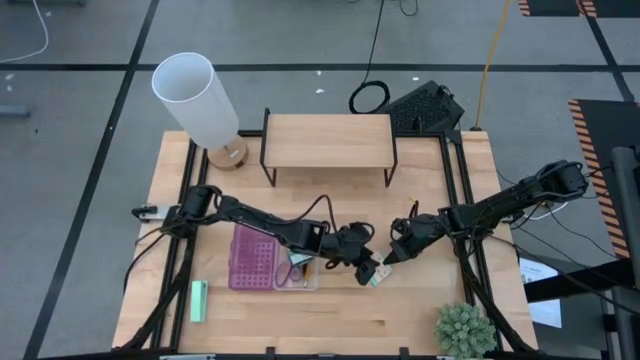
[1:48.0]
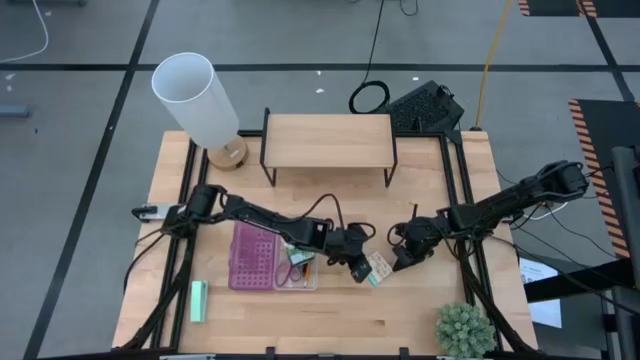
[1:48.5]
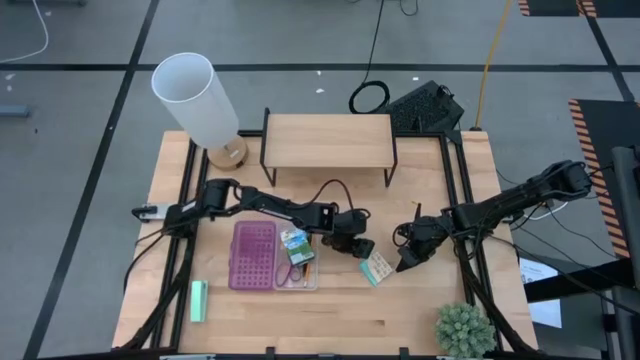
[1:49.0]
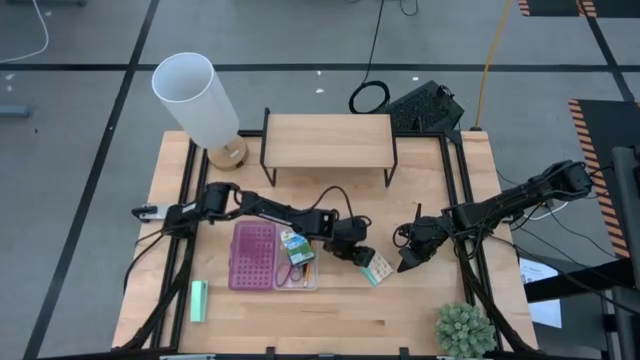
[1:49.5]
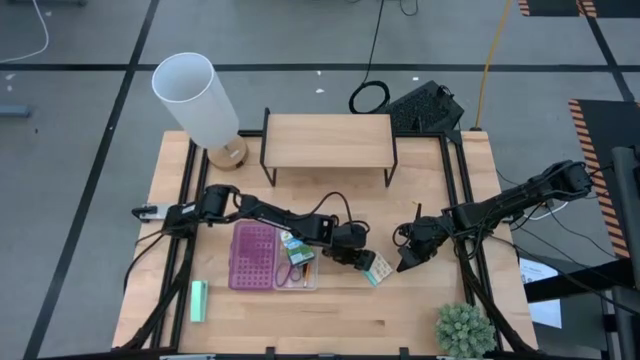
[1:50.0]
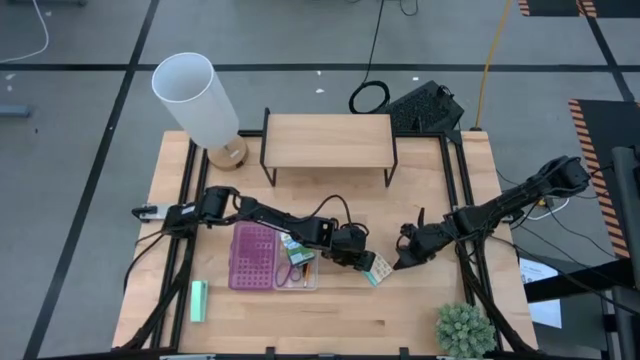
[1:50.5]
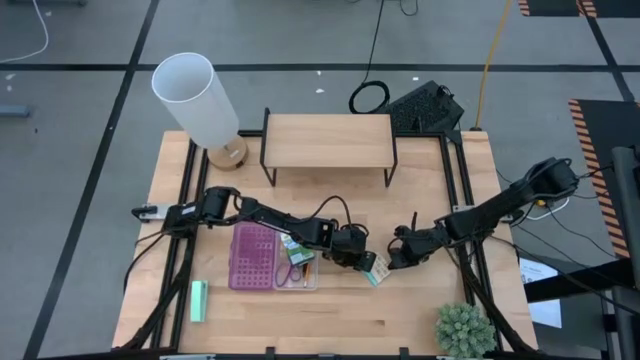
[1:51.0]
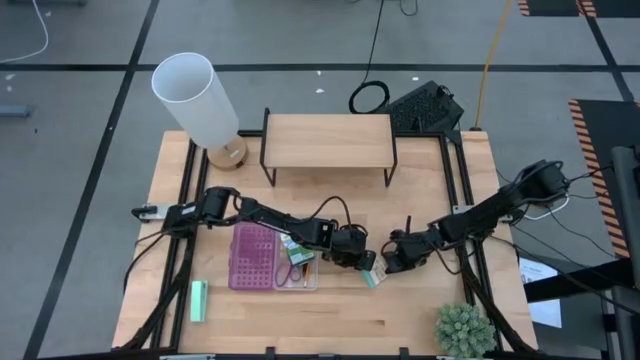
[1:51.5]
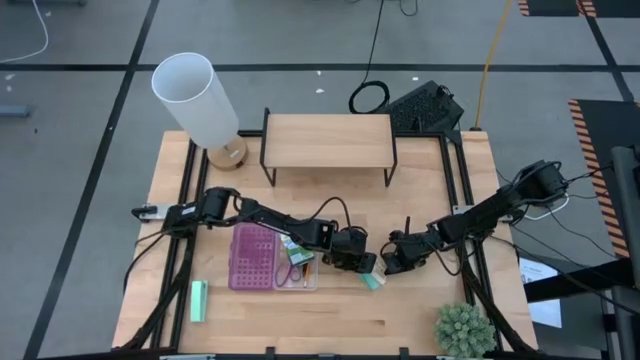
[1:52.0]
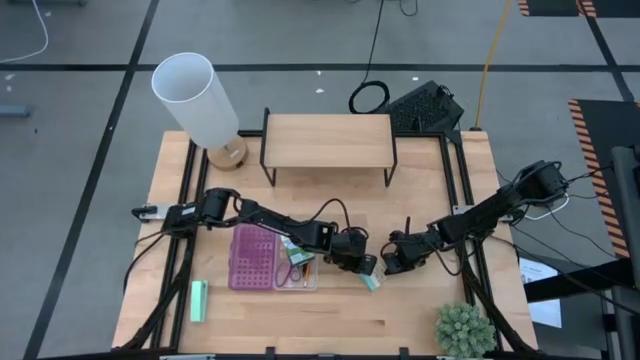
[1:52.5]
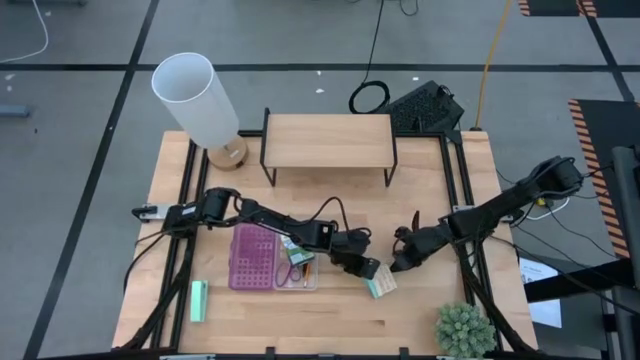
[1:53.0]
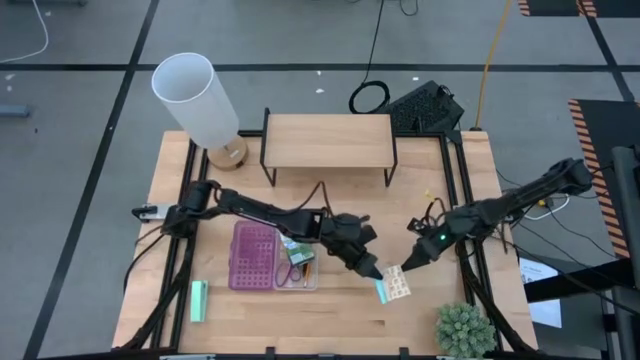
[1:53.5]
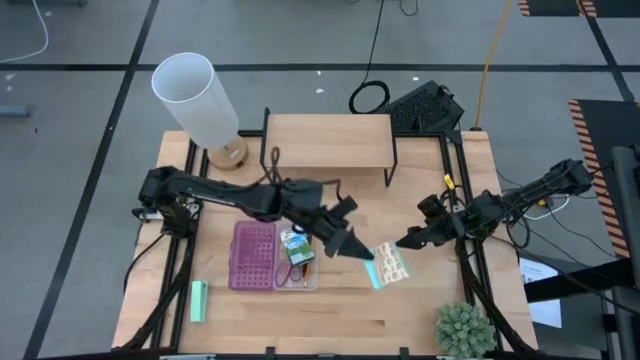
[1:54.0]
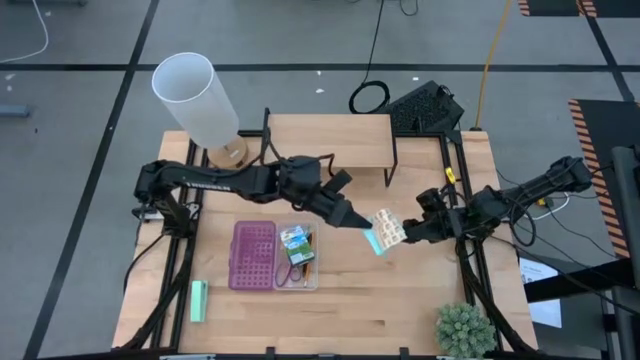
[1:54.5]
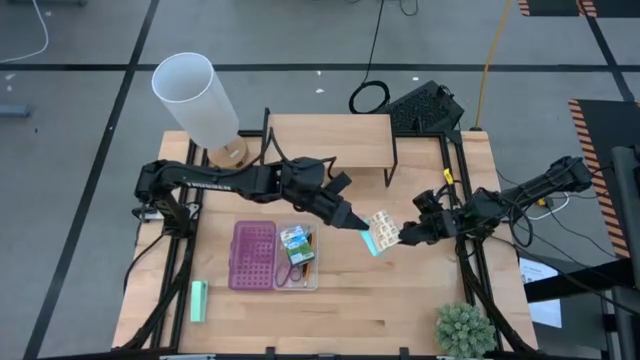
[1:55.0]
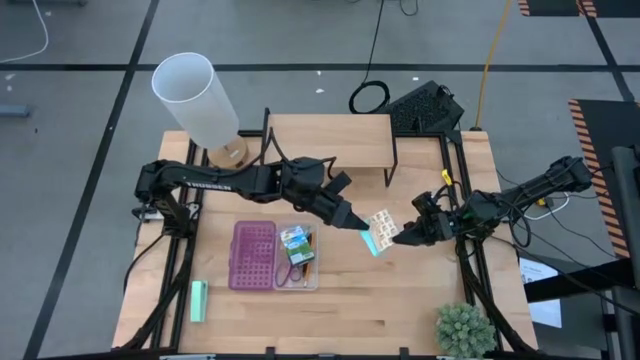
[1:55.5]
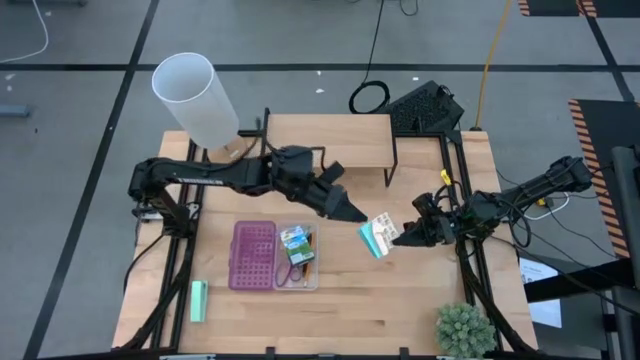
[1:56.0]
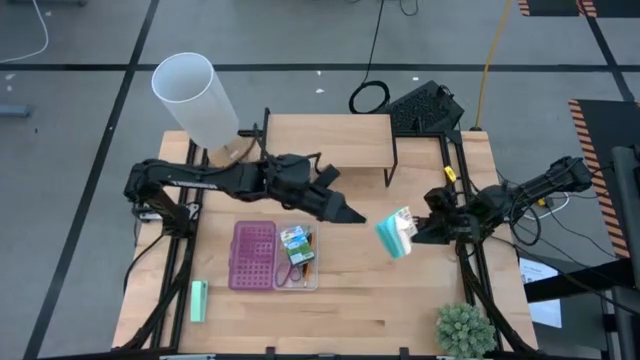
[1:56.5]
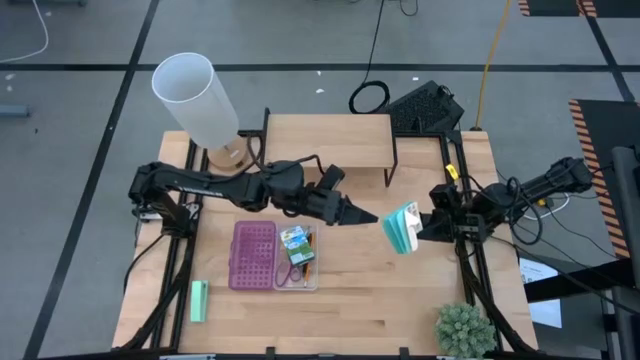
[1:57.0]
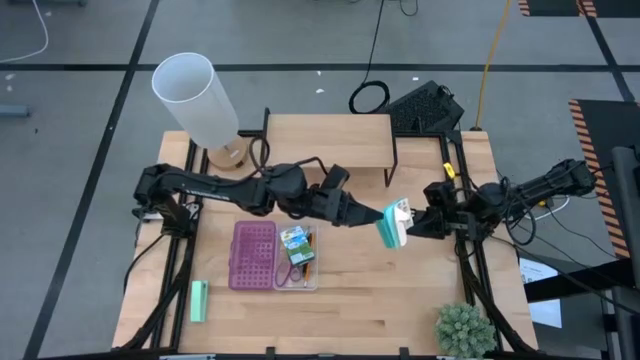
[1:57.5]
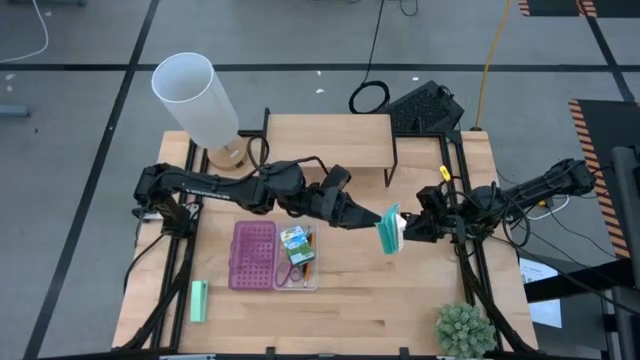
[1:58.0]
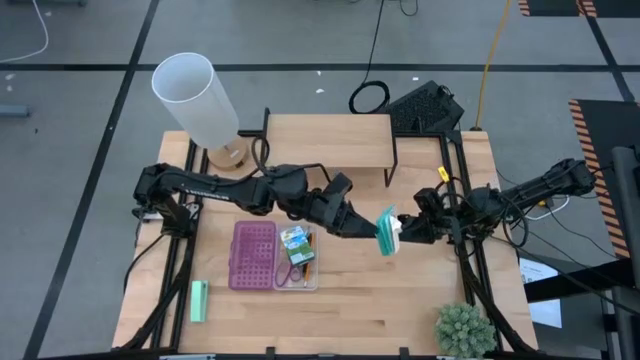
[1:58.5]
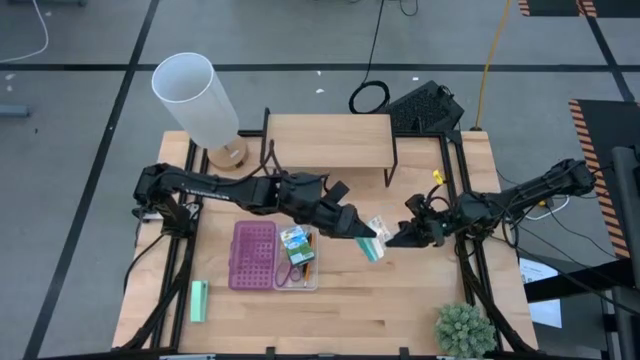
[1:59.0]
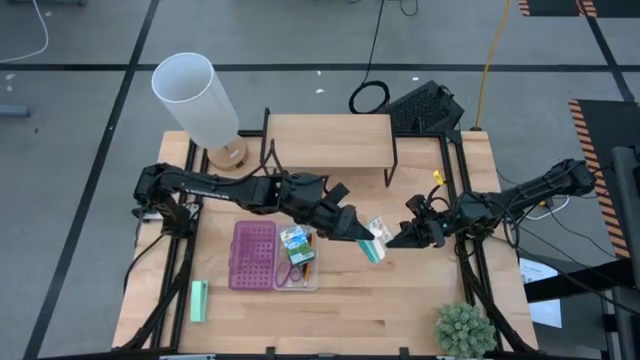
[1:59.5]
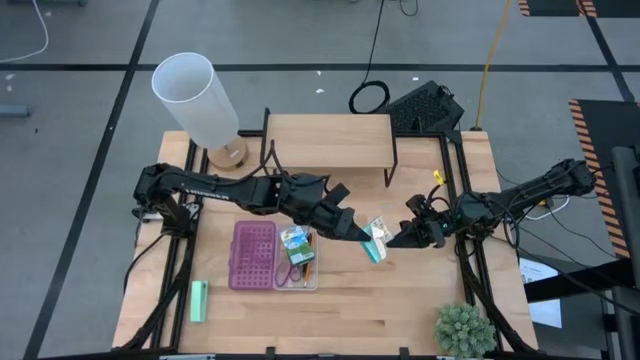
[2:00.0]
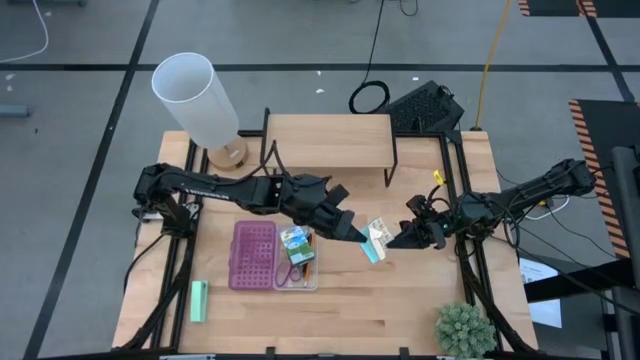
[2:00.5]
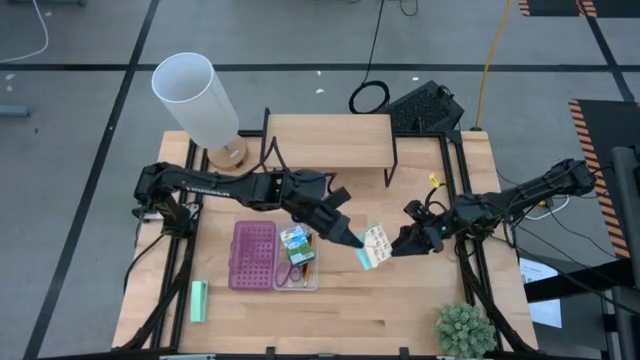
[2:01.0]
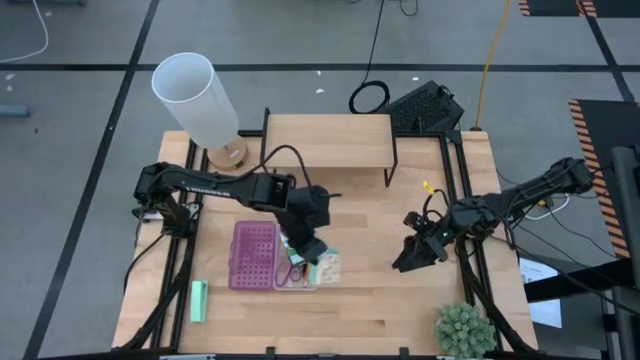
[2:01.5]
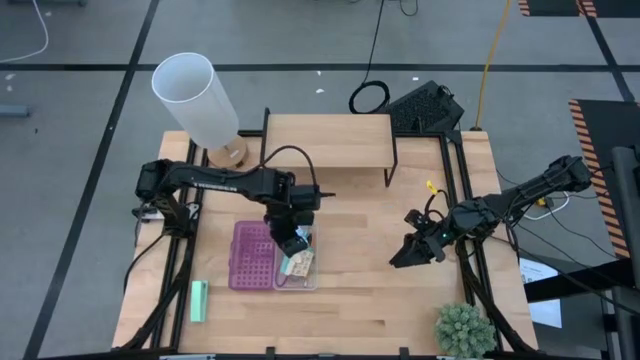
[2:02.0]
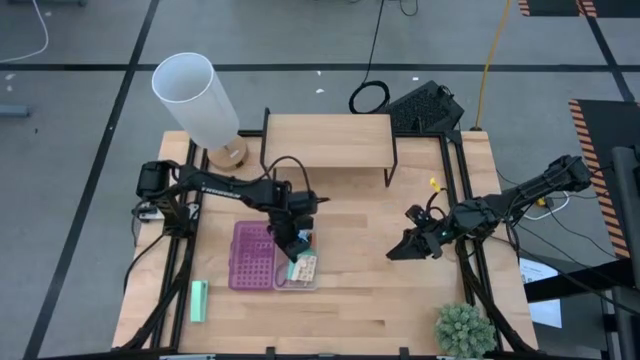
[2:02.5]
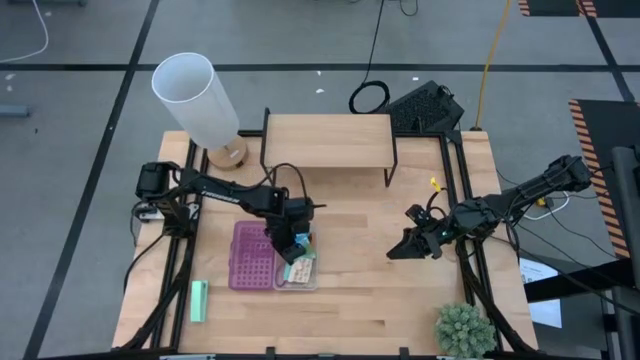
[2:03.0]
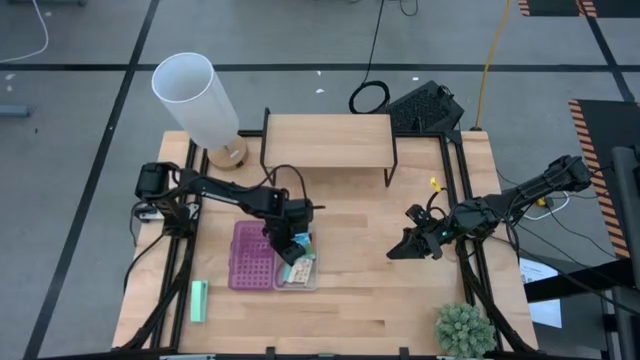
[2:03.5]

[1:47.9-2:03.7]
Task: Pack school essentials
Put the light blue sticky notes into the violet supply box
